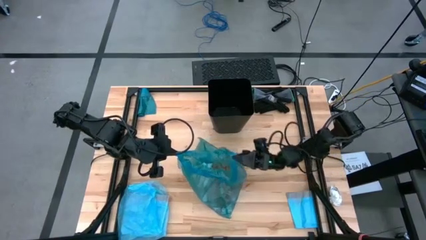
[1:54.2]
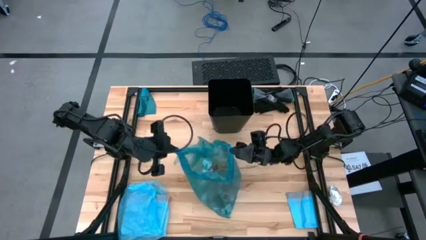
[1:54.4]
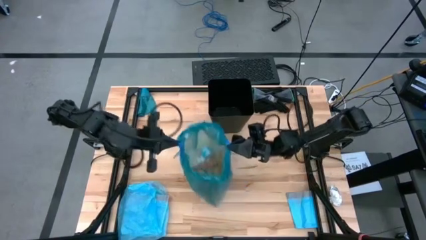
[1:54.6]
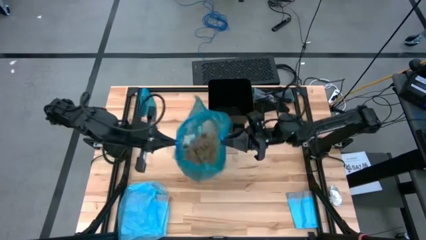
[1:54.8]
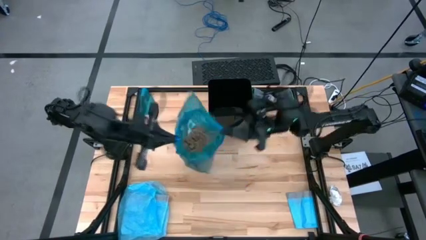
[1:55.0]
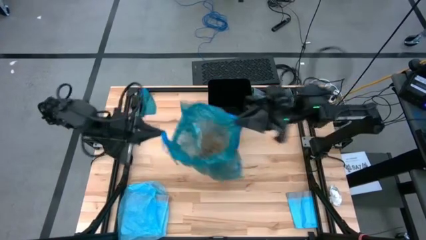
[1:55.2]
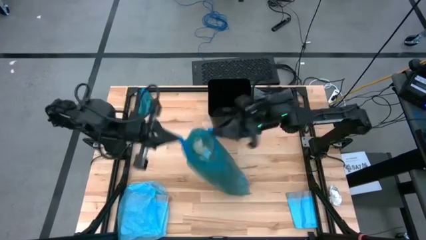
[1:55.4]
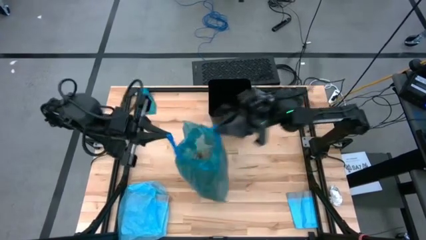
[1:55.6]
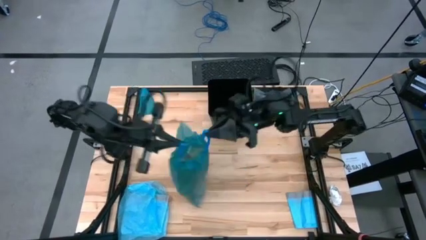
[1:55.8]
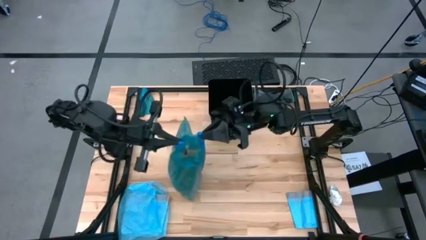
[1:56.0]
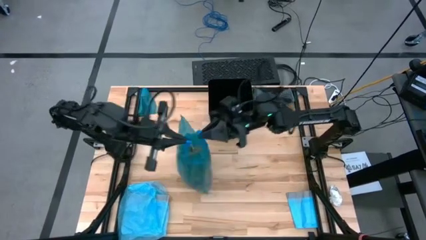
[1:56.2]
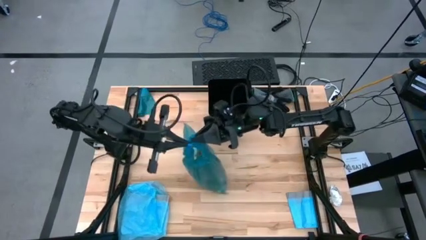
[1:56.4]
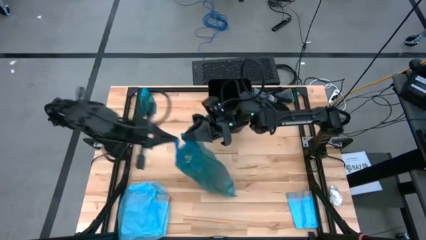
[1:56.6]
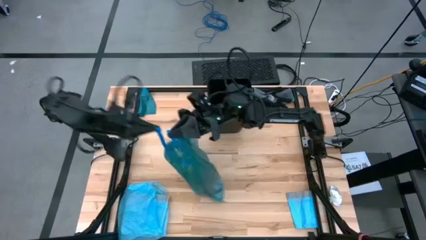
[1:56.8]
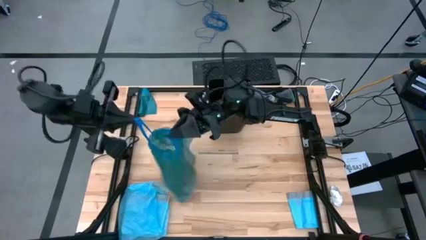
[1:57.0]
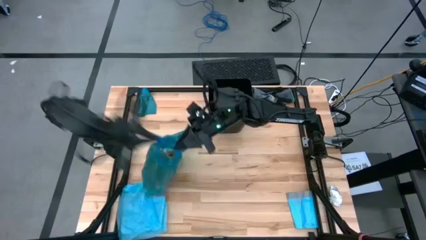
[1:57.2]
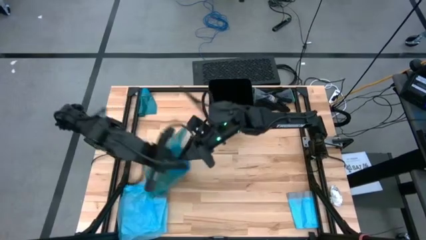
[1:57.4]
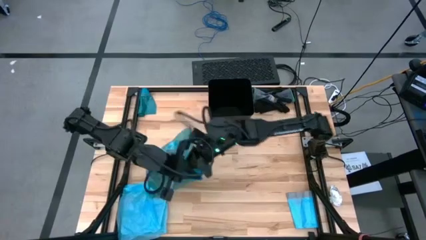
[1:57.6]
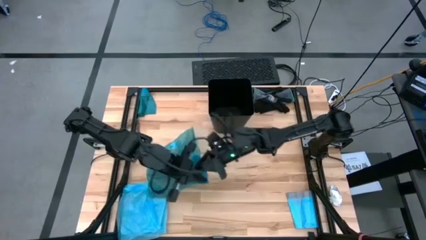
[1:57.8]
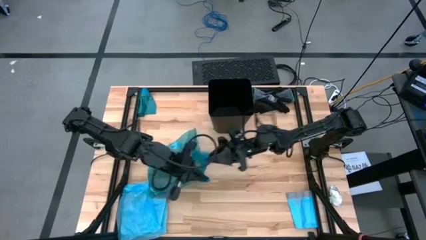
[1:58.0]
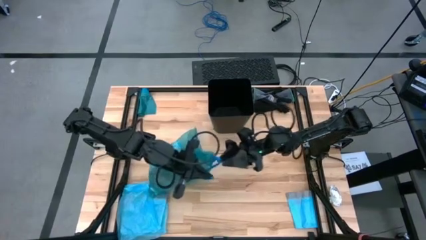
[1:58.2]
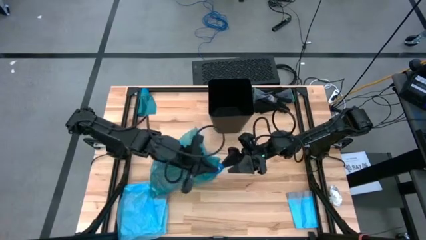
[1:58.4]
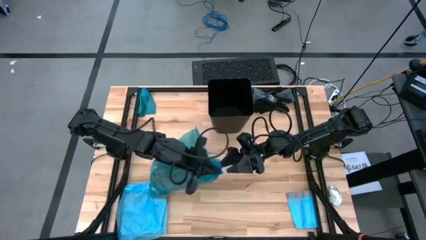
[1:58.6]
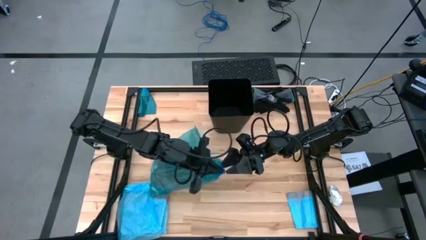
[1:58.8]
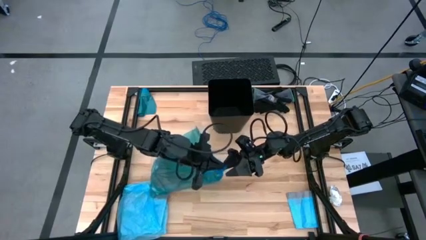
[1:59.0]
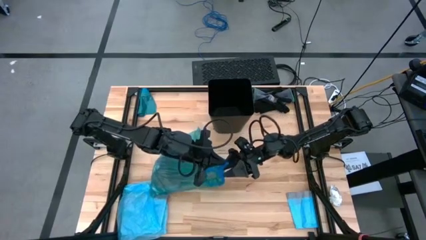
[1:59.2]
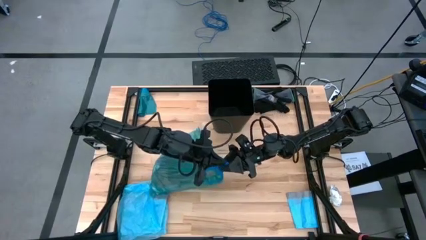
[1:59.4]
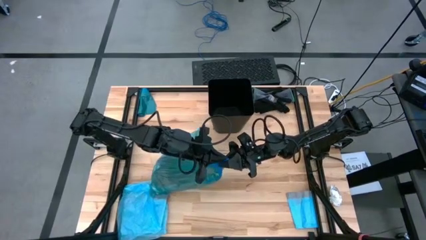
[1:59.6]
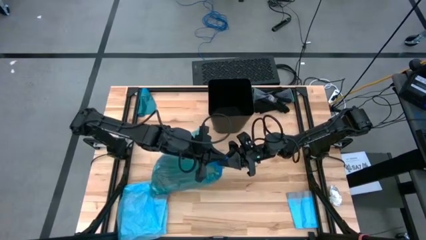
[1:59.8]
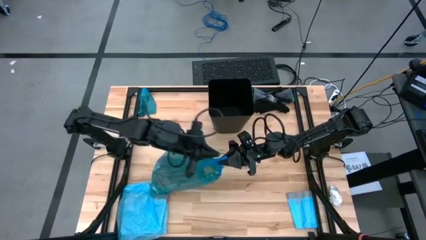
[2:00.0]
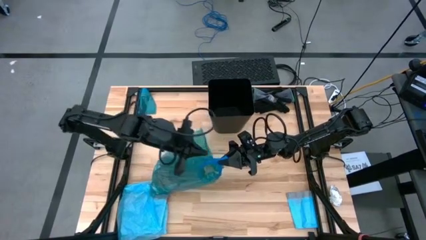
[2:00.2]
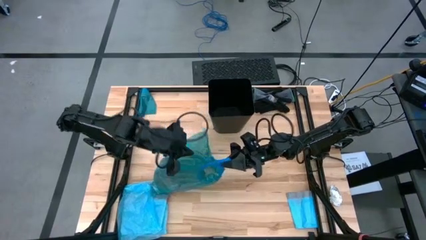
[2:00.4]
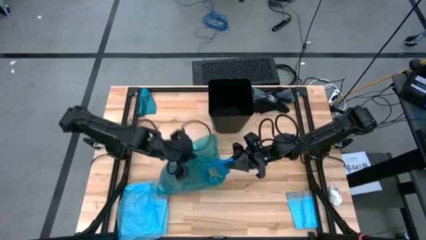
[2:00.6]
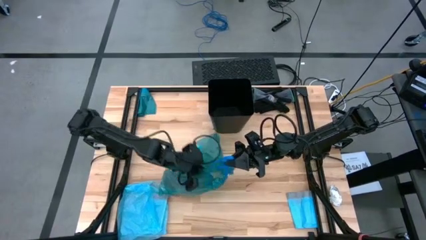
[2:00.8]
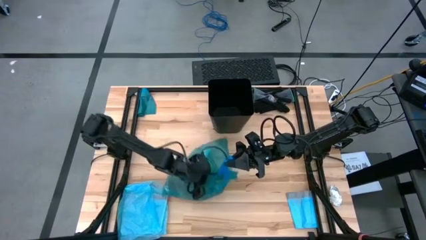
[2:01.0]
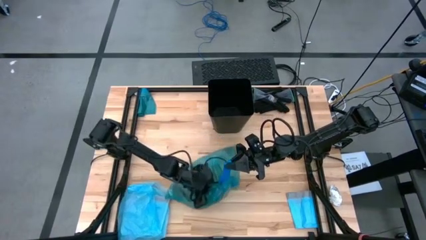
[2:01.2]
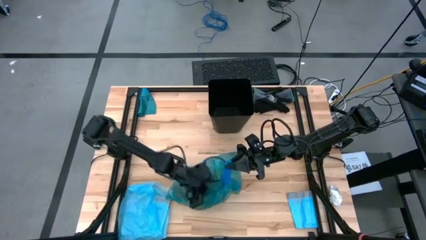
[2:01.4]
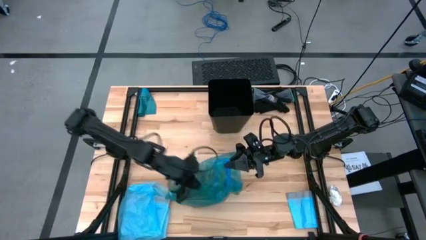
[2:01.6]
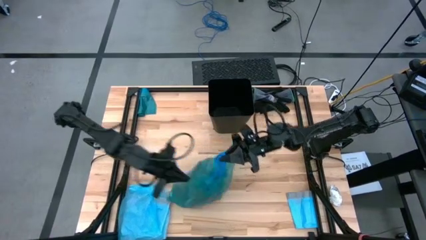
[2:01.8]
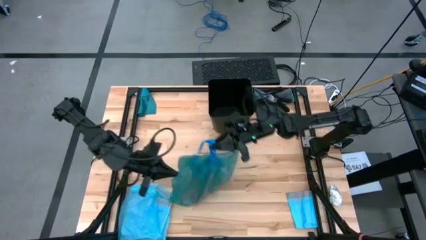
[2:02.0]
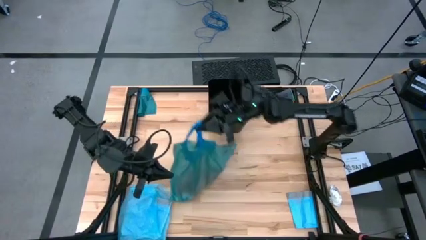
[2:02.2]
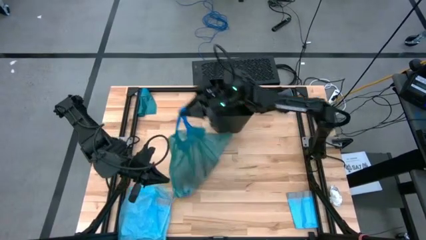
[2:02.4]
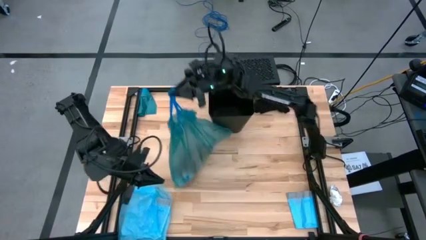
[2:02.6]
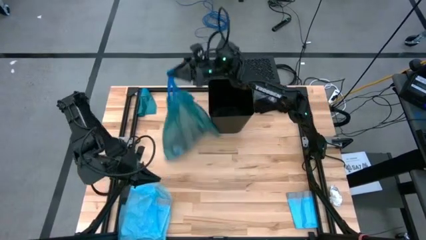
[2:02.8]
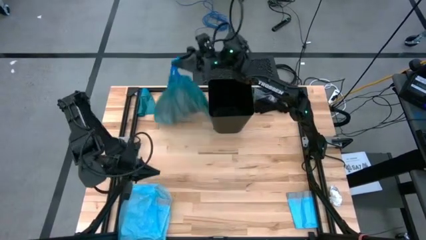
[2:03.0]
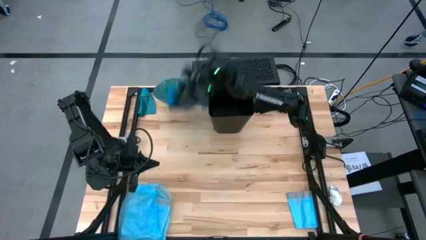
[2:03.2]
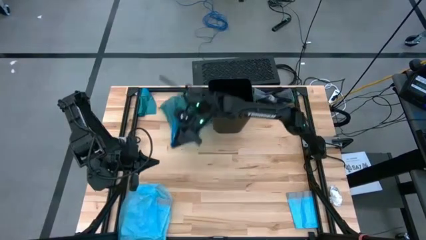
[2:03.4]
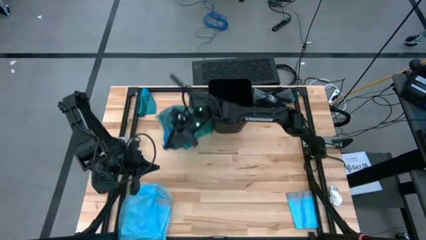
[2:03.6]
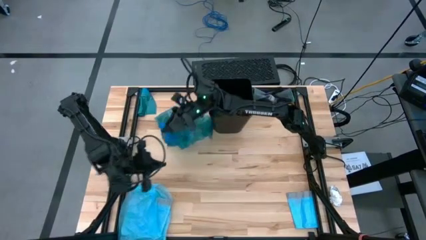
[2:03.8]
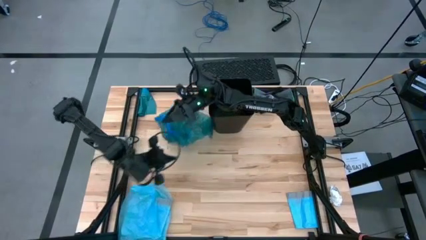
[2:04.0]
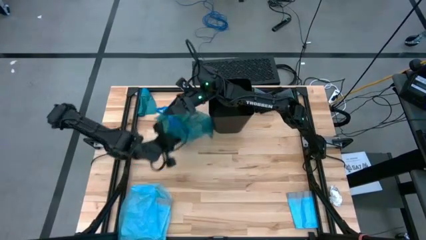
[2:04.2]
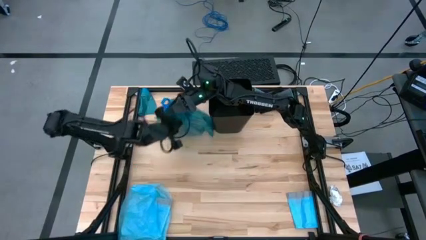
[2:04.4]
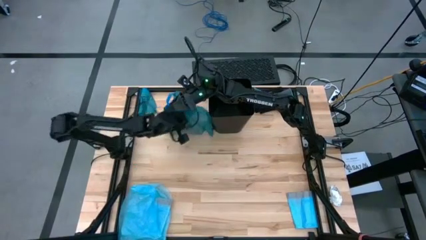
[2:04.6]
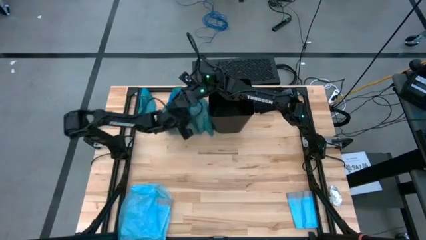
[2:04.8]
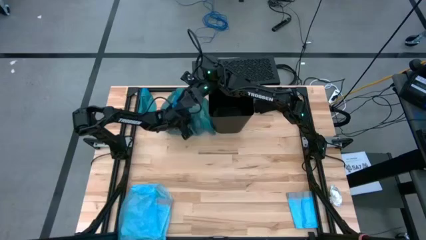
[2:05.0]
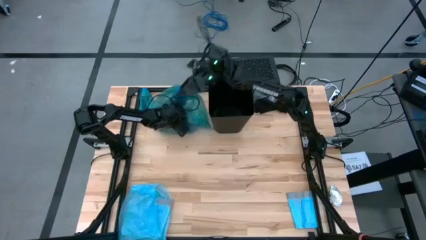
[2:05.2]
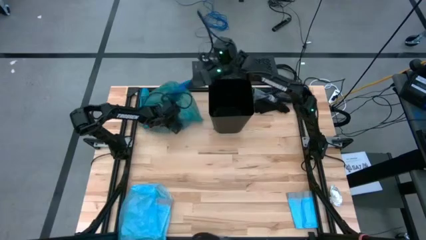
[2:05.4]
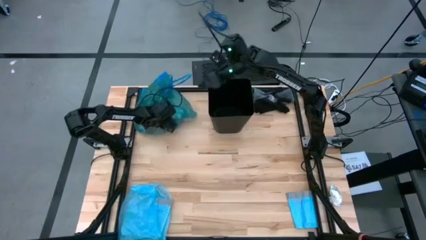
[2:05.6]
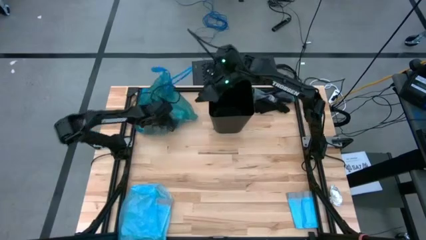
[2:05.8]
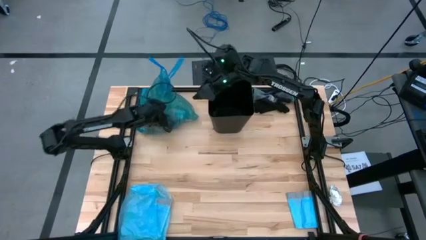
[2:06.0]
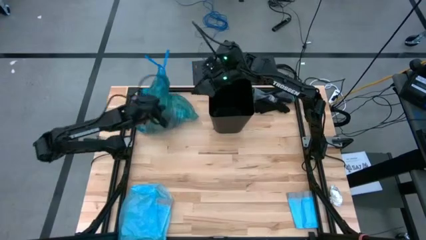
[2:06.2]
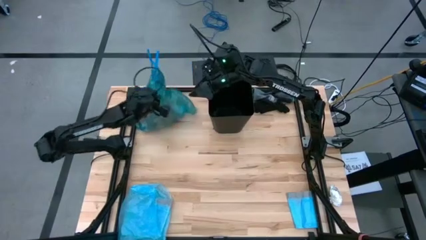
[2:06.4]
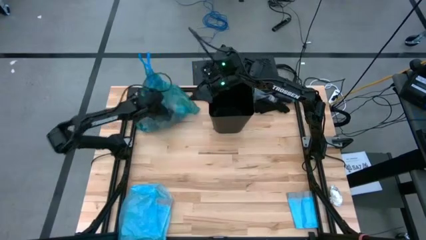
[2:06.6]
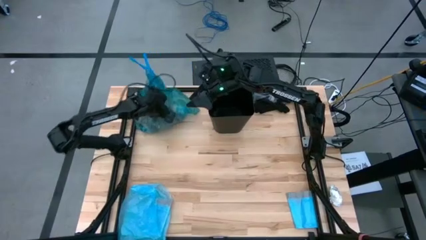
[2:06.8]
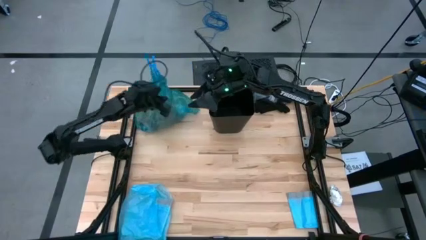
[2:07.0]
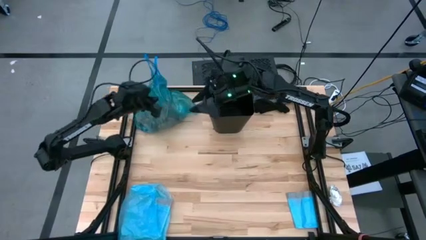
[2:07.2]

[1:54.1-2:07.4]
Task: place trash/remove bag and relplace
Close the blue trash bag

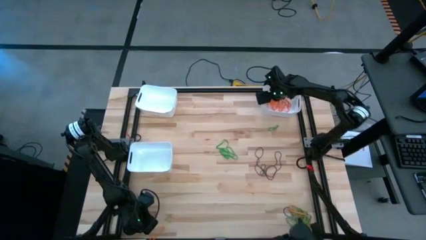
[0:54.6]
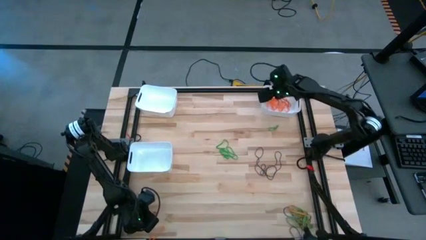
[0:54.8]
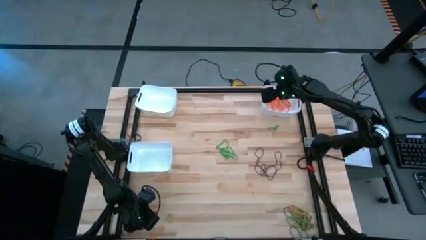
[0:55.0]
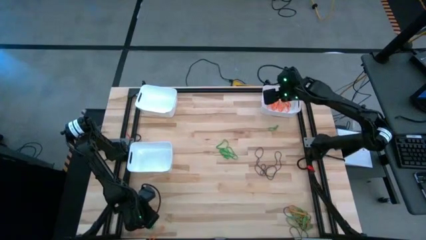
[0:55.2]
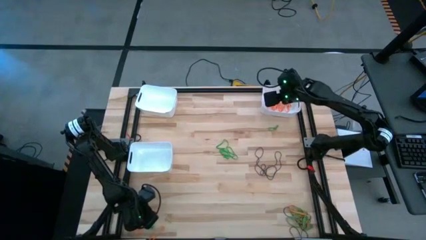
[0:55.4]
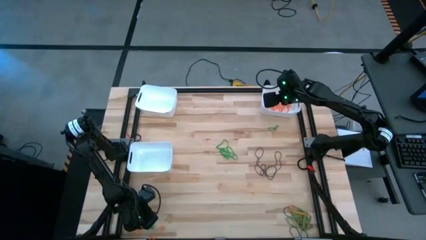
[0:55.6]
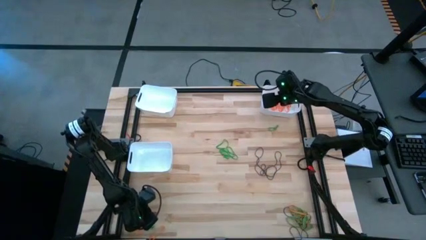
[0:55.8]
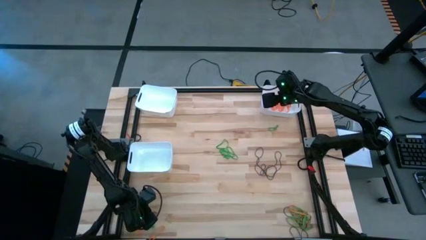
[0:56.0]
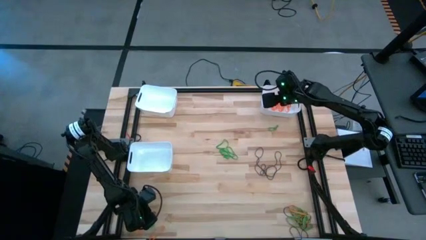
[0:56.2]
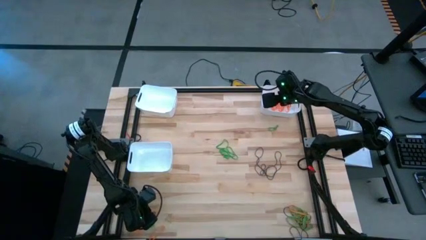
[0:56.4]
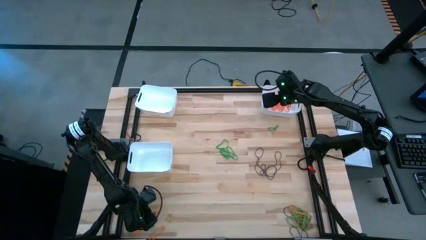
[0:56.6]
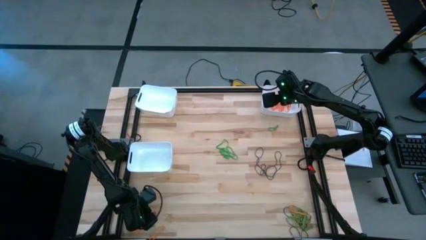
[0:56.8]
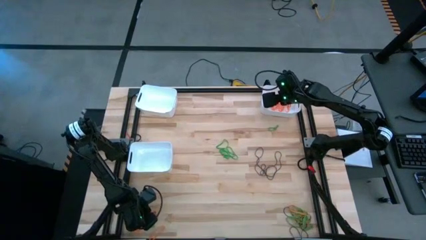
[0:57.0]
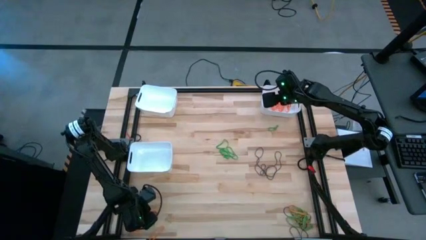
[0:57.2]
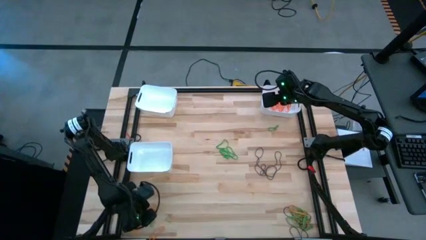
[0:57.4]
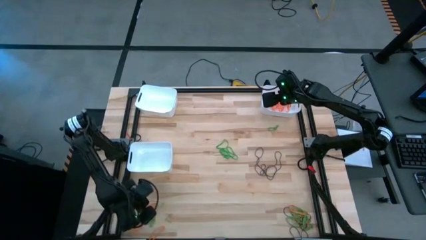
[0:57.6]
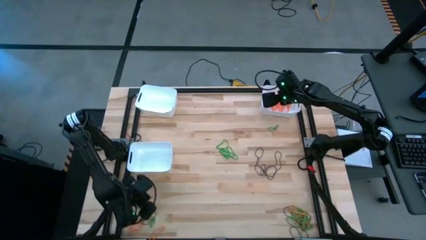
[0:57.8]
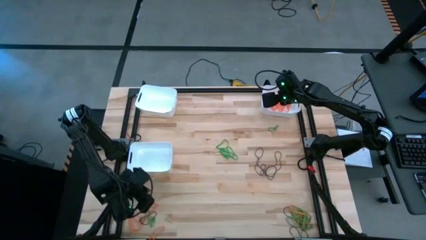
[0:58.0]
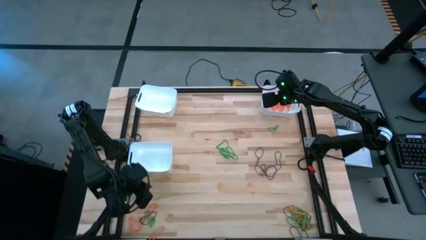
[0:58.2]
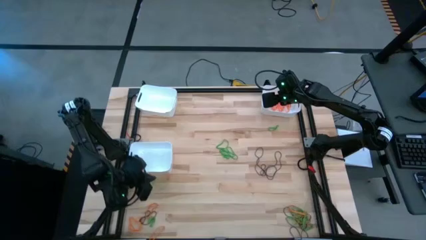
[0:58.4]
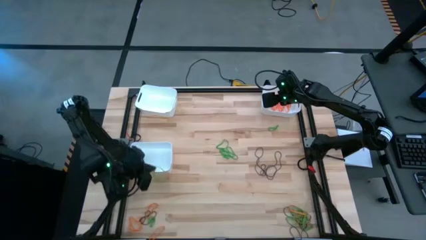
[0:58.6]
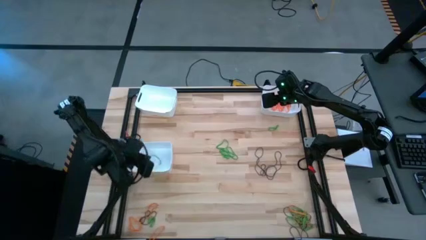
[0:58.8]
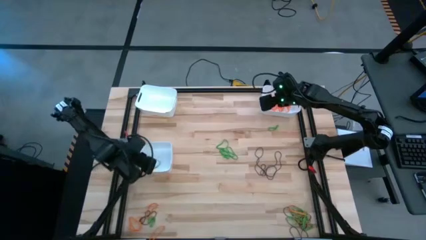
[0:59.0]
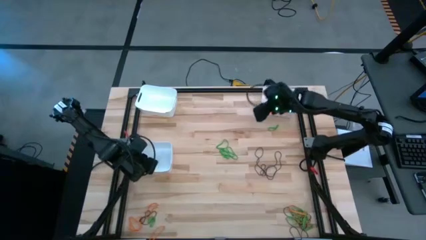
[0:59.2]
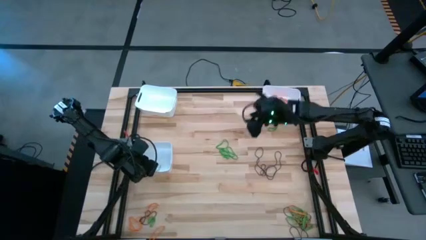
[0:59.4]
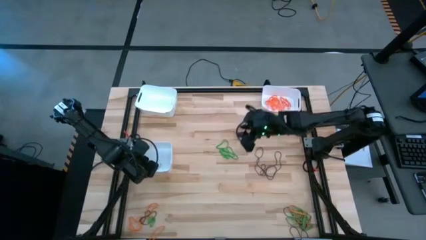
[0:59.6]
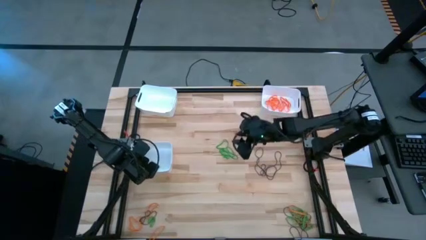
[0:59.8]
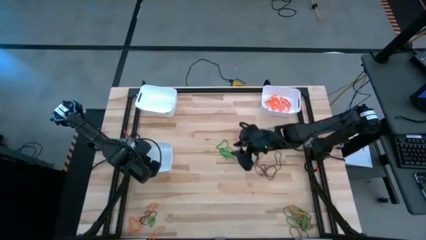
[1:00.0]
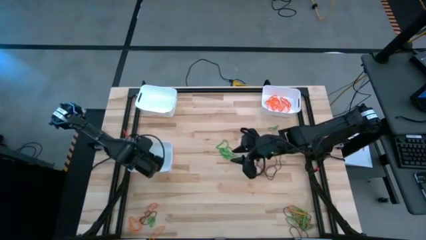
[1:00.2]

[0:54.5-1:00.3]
Task: Sort rubber bands into baskets
Put the green rubber band into the bottom white bin
